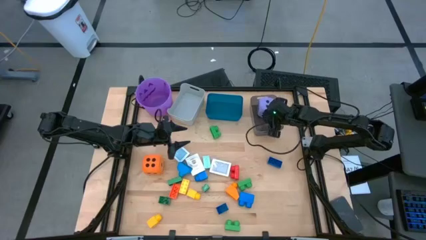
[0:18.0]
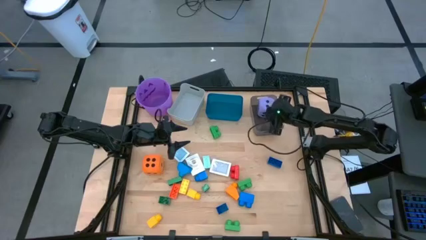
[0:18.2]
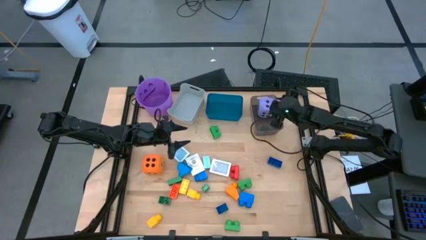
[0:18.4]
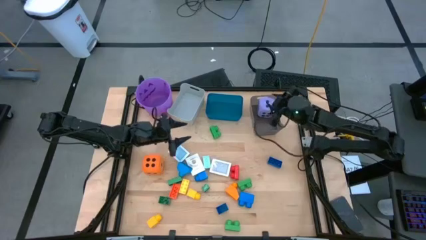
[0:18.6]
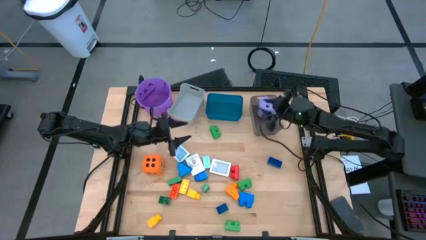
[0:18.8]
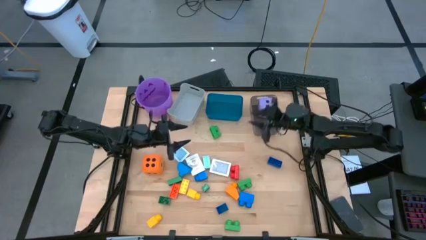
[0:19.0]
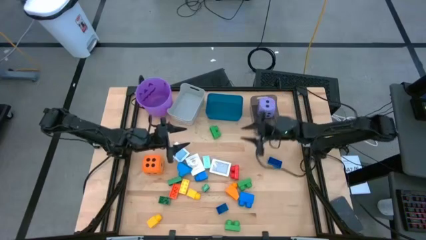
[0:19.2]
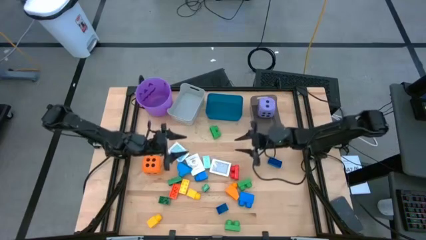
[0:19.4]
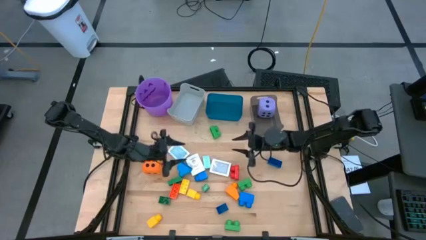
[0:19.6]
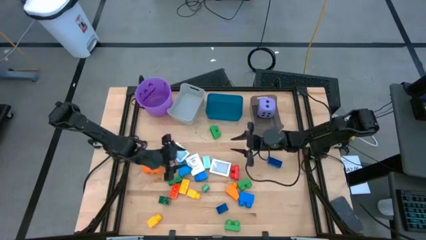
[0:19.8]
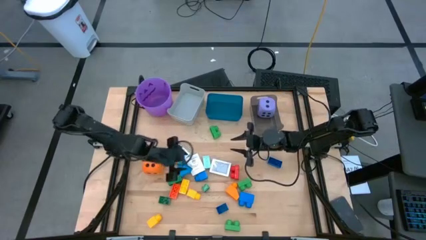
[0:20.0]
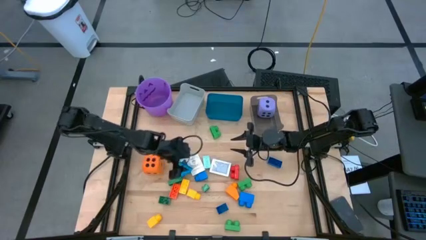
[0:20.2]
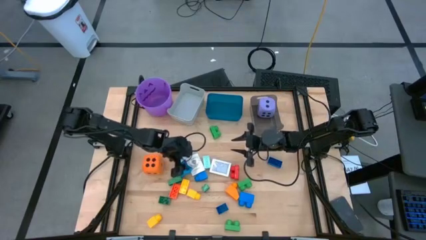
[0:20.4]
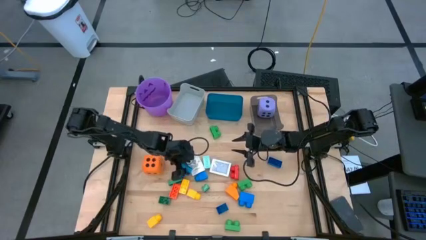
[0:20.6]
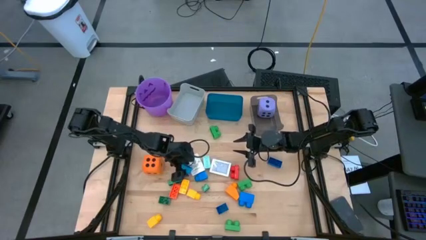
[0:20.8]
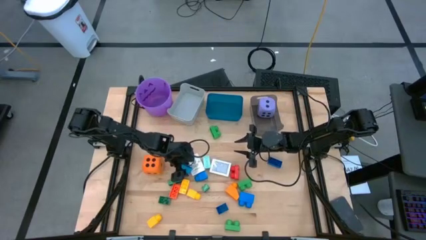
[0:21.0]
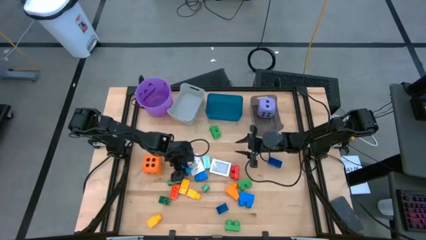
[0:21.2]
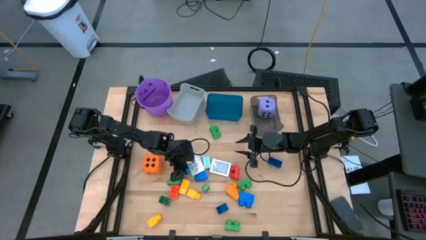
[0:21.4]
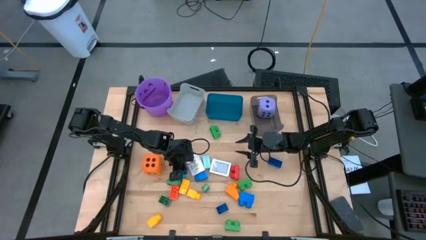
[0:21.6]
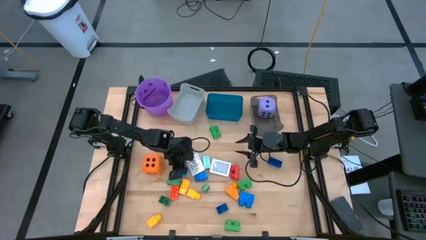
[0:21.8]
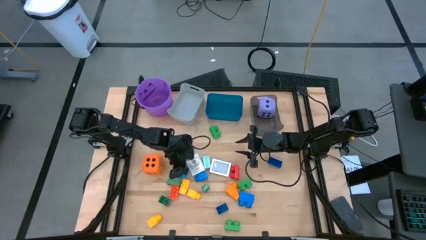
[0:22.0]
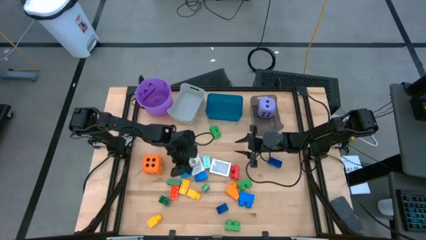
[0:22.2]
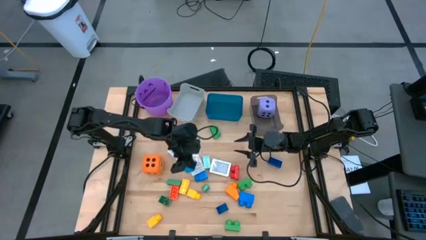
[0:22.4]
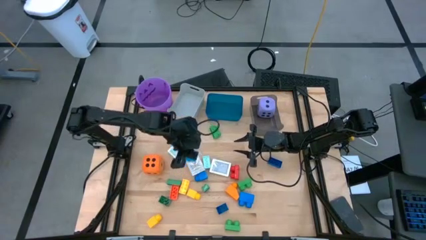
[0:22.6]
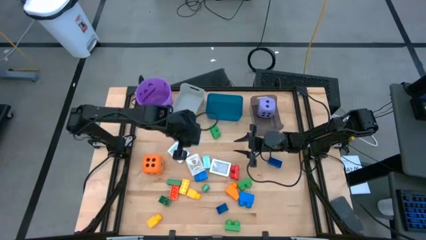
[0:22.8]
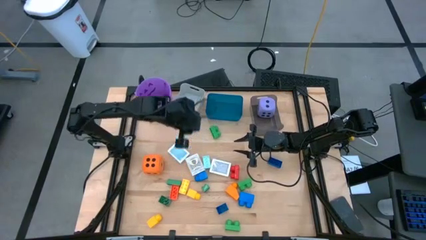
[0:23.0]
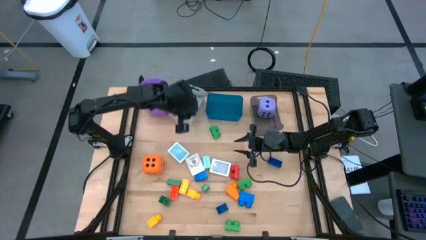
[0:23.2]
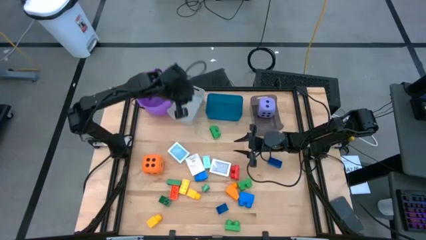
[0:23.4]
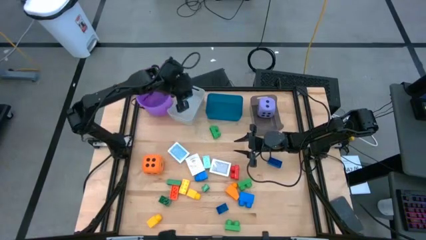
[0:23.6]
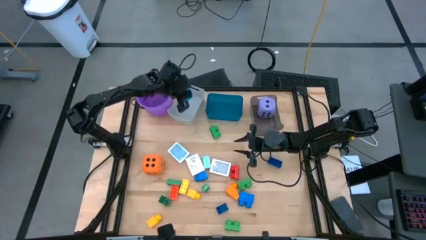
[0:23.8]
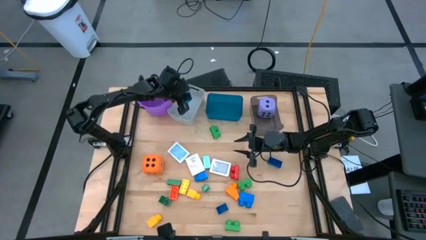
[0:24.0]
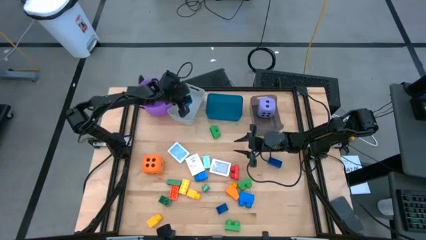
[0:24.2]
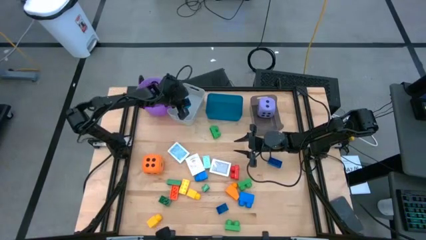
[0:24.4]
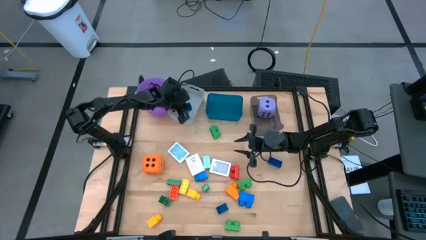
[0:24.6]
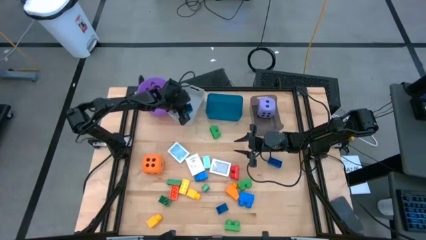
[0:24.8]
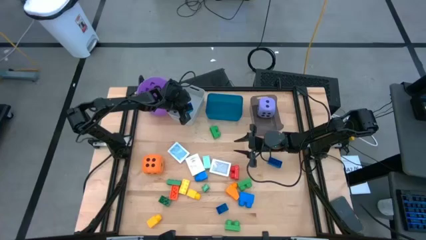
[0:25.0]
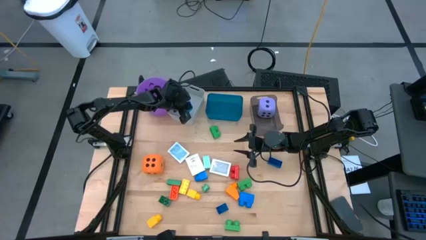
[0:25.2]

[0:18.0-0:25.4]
Task: Pick & Place Toys
Put the blue game piece into the gray bin

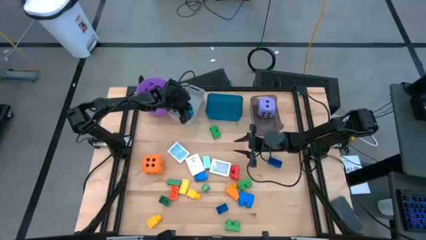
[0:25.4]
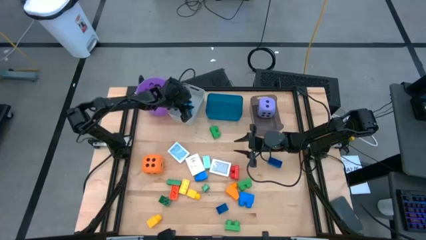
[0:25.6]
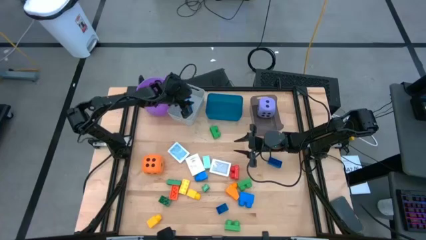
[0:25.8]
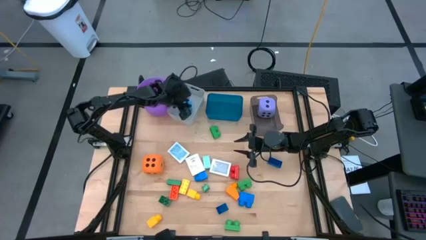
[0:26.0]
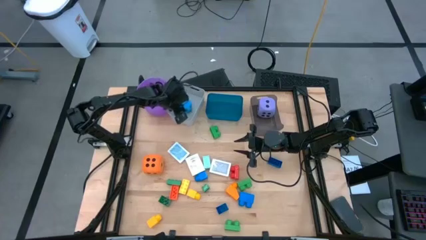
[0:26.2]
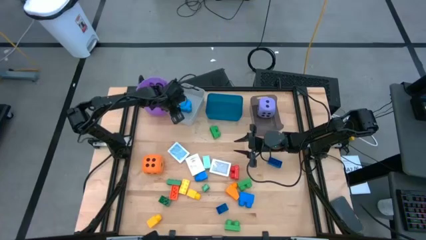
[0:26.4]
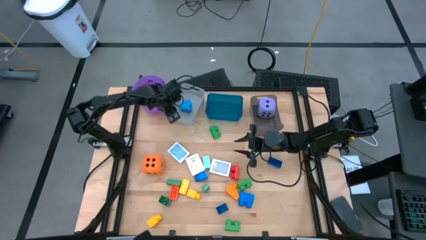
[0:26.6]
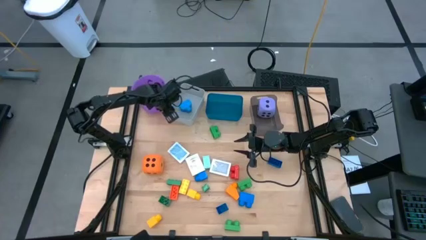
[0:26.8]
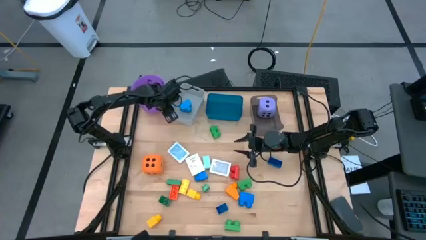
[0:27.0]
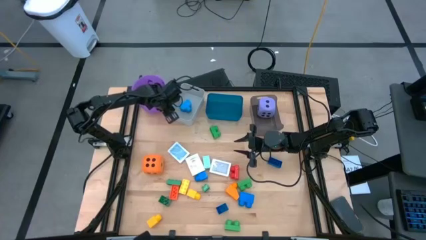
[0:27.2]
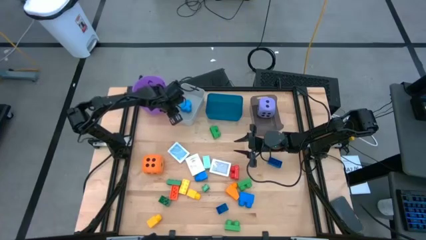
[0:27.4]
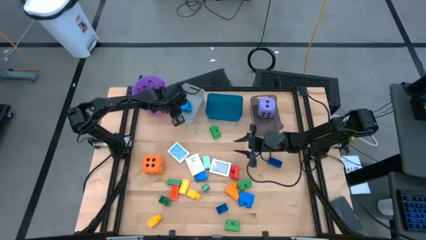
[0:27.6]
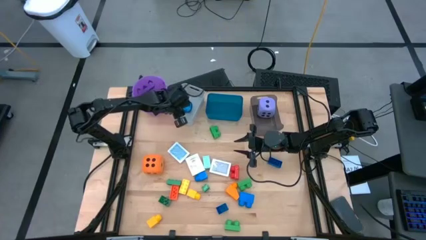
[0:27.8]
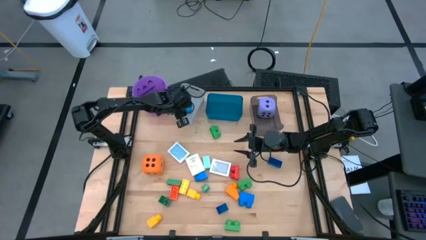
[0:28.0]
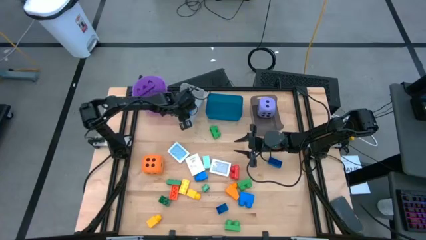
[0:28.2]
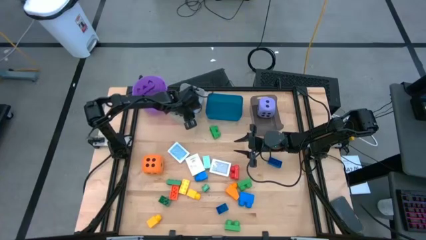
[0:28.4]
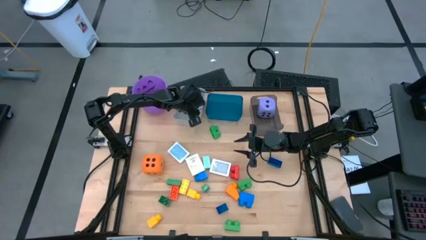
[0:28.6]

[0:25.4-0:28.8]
Adjust the gray bin

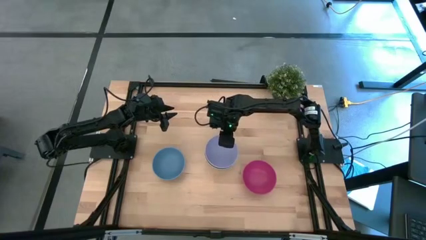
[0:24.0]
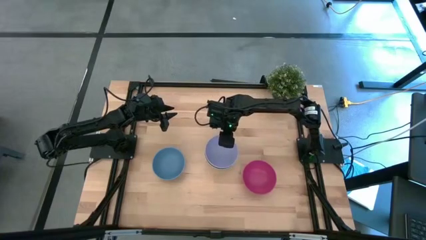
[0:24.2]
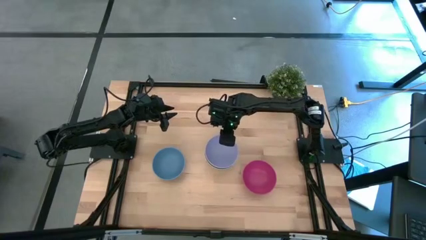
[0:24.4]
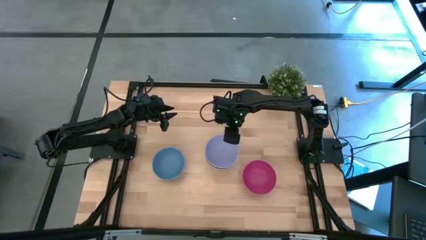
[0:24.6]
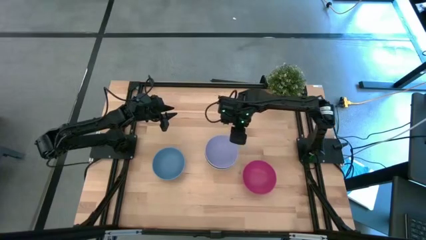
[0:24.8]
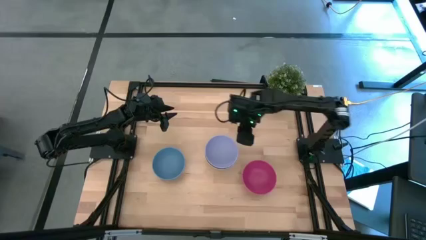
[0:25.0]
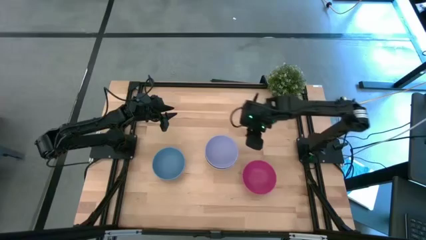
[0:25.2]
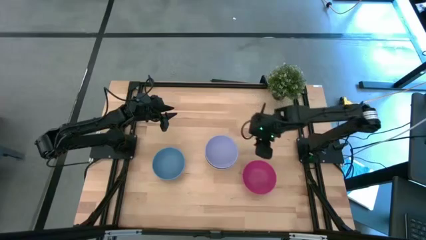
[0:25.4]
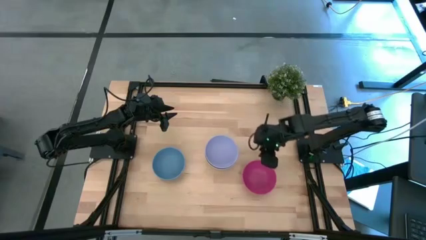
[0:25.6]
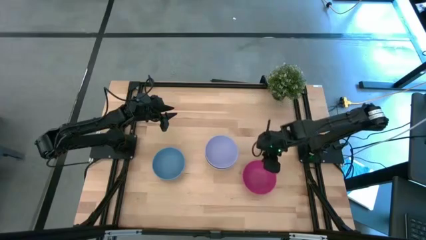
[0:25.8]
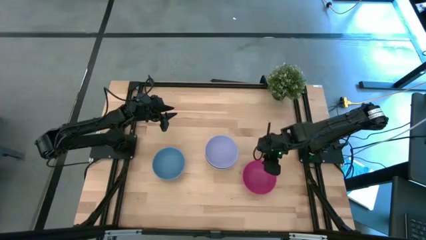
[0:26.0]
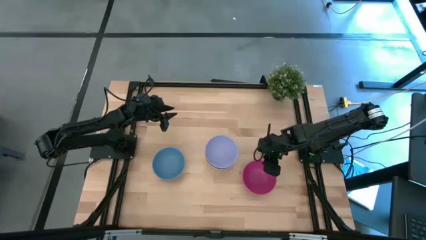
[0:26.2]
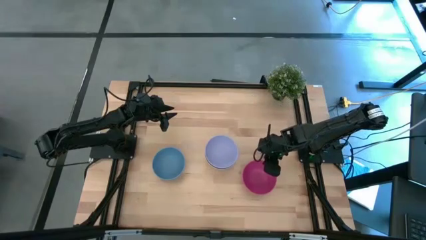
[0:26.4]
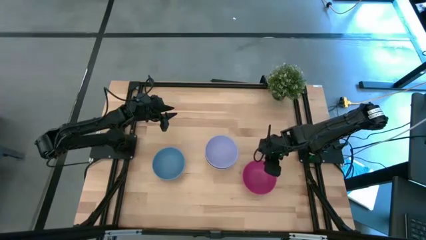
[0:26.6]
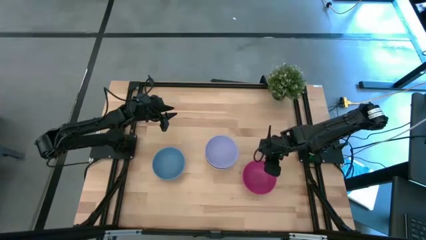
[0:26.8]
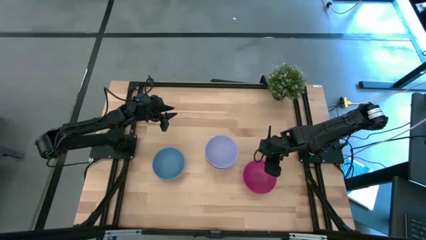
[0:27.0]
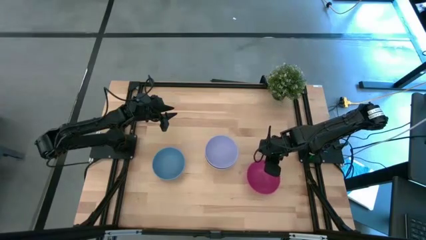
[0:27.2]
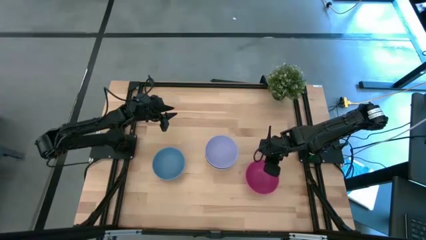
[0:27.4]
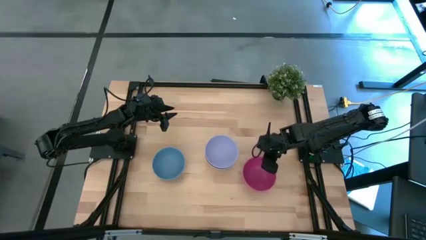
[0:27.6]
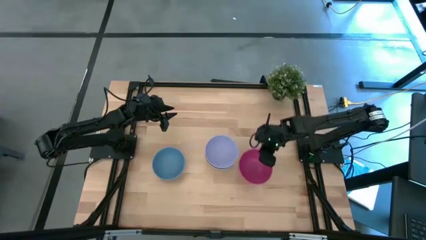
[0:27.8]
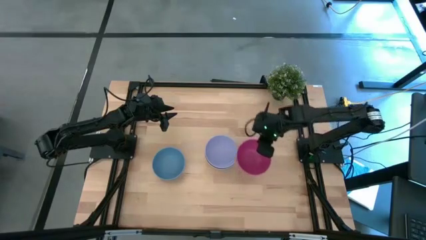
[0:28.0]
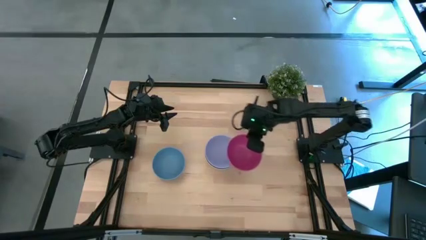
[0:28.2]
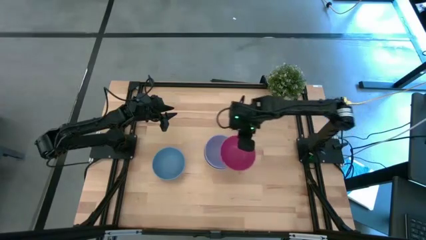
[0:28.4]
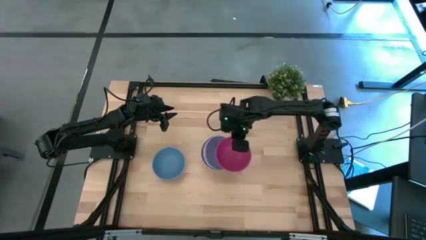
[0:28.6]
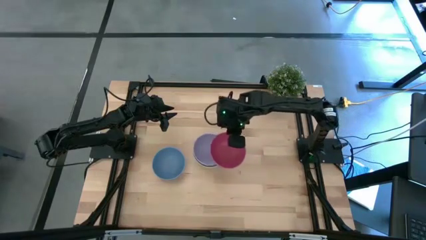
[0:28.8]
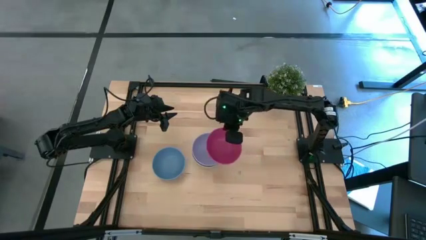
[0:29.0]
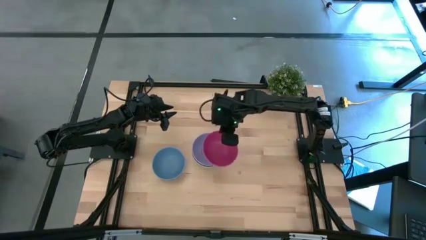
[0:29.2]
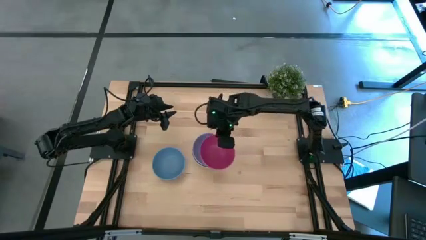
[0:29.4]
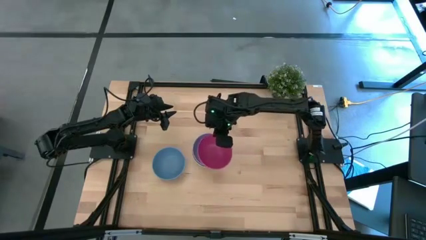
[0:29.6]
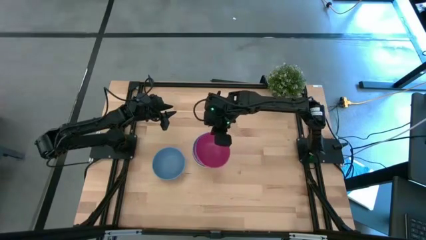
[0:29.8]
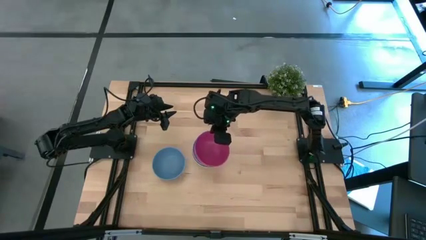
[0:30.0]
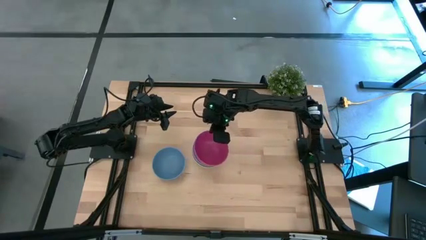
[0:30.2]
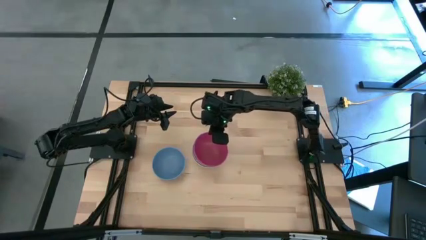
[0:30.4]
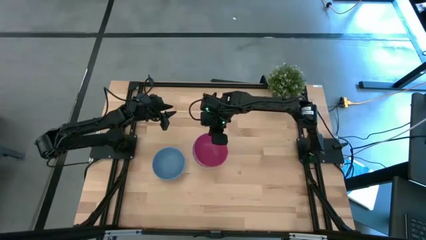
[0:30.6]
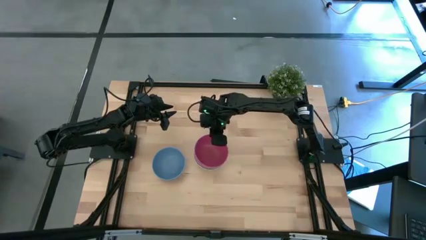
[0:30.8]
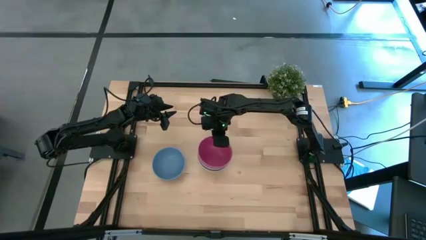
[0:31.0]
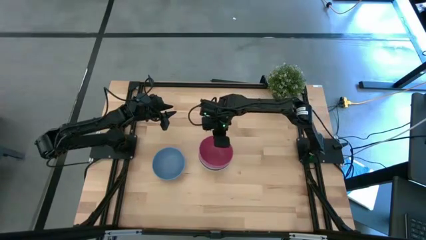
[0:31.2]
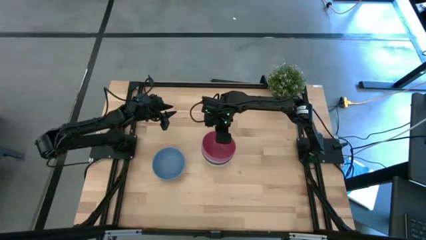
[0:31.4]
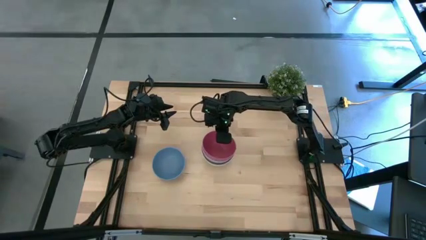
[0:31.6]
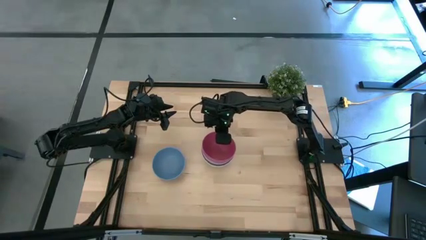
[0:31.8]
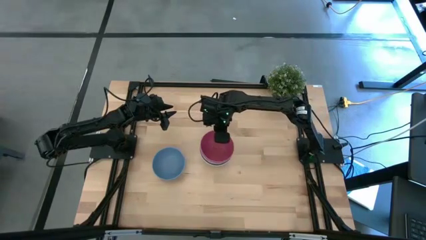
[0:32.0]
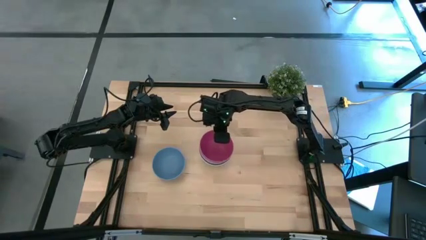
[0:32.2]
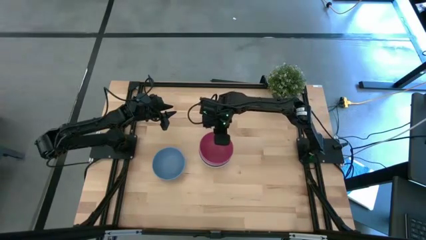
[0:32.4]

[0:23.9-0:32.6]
Task: Nest bowls inside each other
Stack the pink bowl on top of the purple bowl
